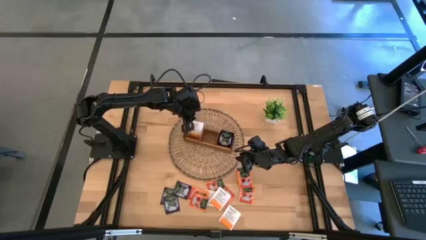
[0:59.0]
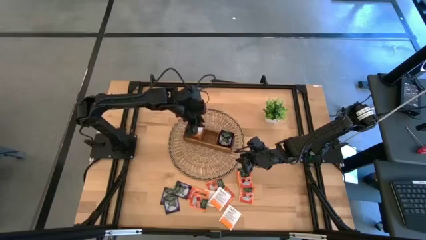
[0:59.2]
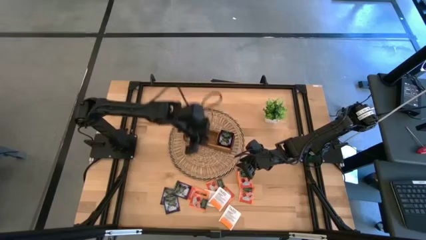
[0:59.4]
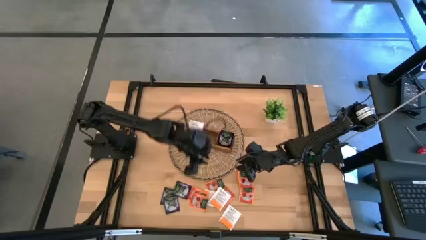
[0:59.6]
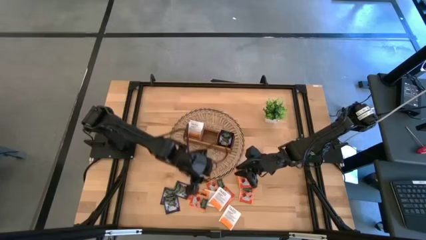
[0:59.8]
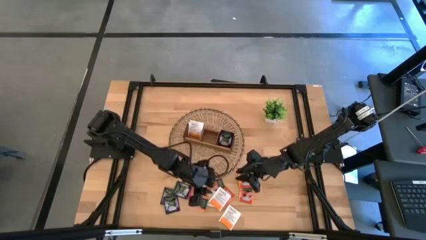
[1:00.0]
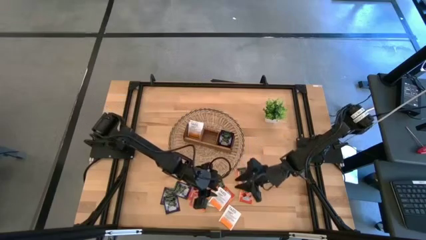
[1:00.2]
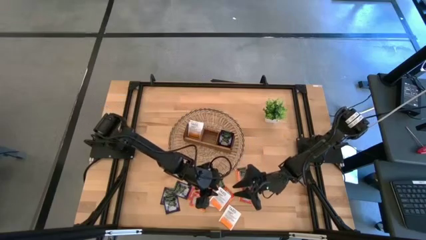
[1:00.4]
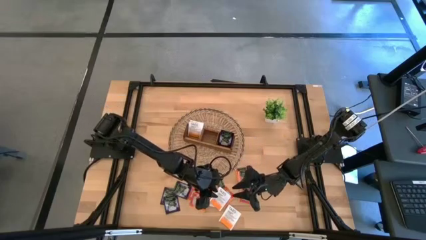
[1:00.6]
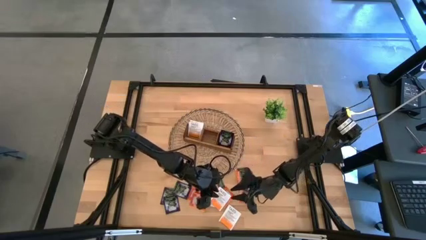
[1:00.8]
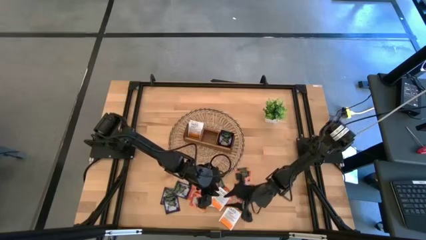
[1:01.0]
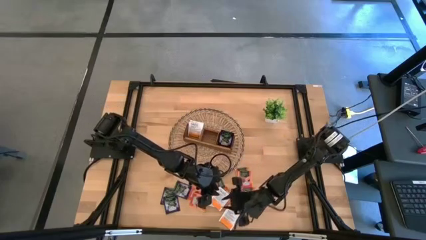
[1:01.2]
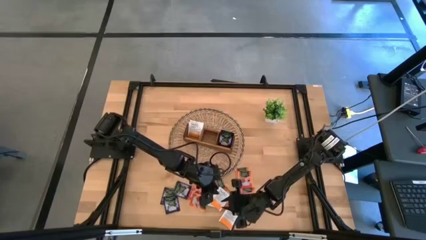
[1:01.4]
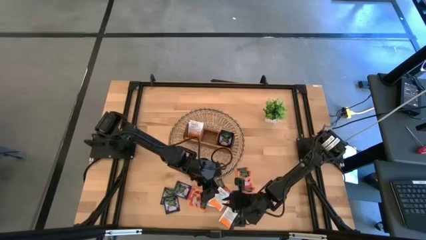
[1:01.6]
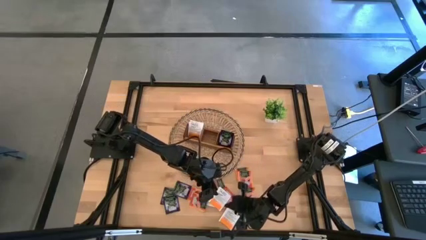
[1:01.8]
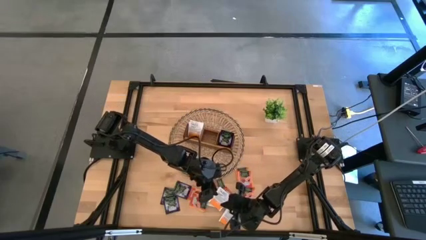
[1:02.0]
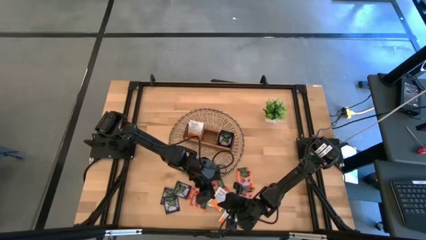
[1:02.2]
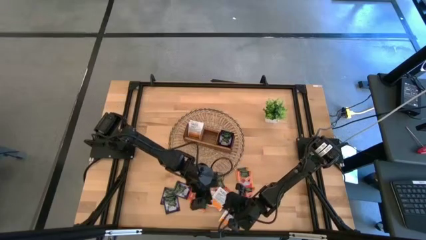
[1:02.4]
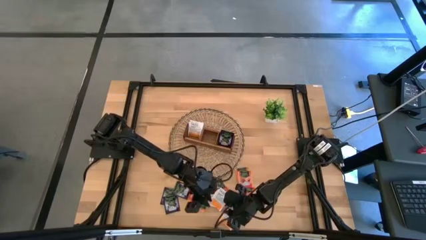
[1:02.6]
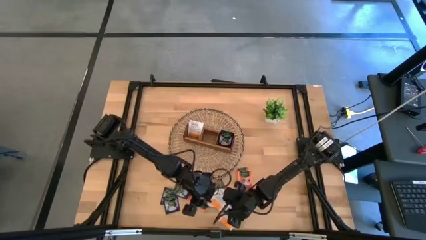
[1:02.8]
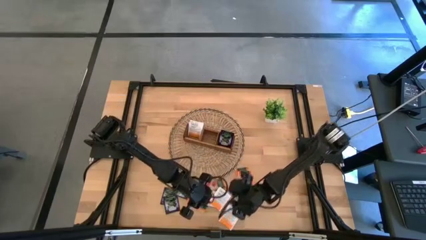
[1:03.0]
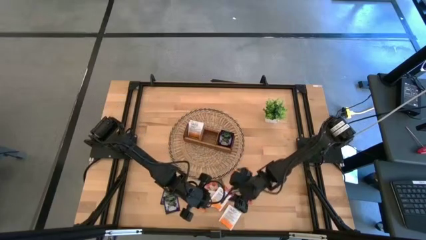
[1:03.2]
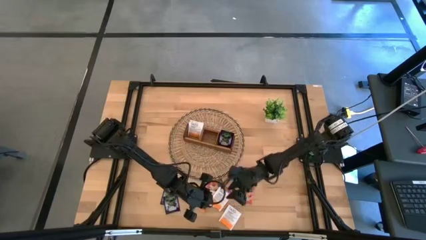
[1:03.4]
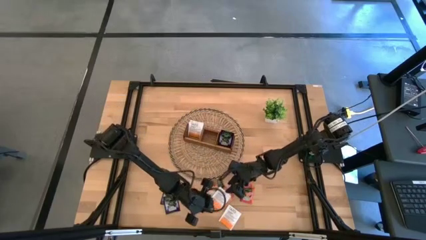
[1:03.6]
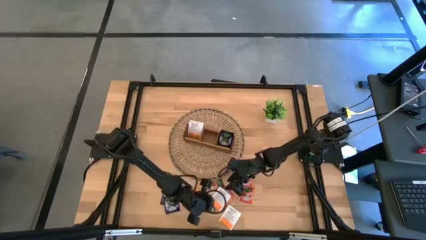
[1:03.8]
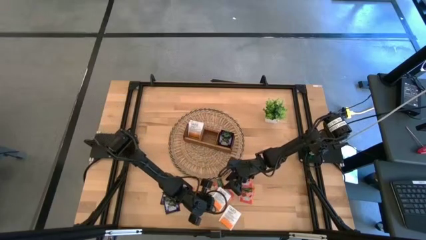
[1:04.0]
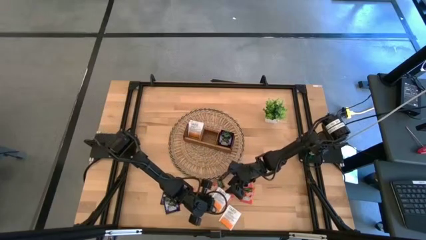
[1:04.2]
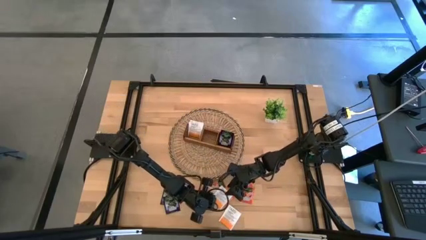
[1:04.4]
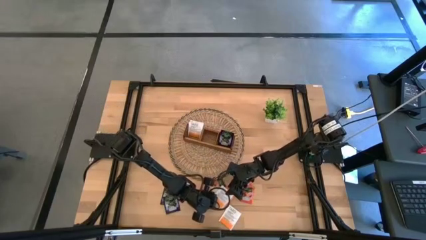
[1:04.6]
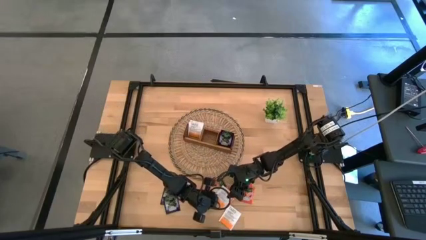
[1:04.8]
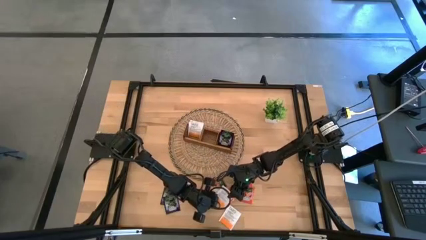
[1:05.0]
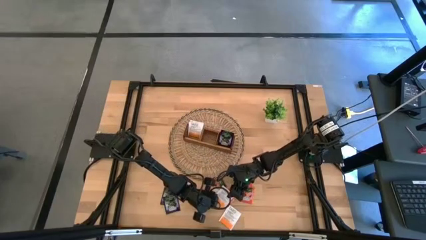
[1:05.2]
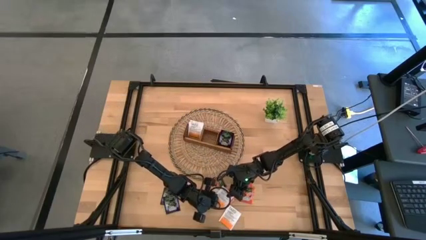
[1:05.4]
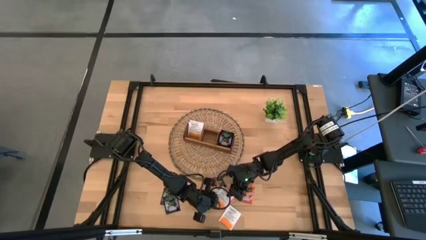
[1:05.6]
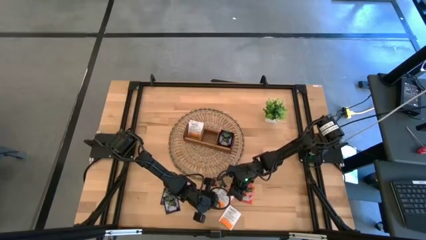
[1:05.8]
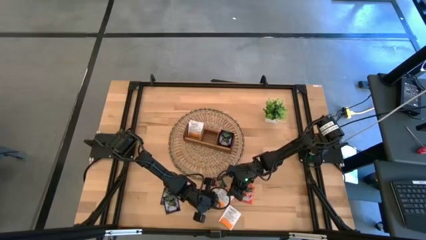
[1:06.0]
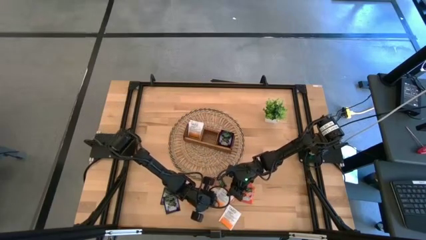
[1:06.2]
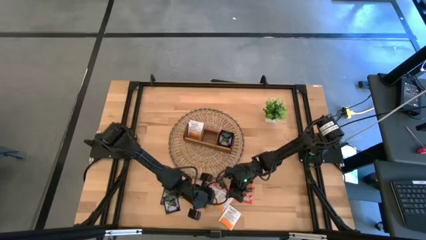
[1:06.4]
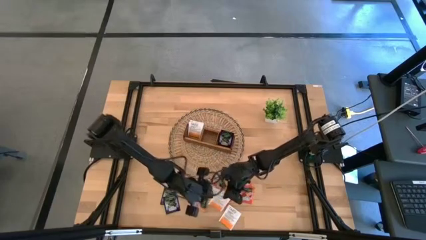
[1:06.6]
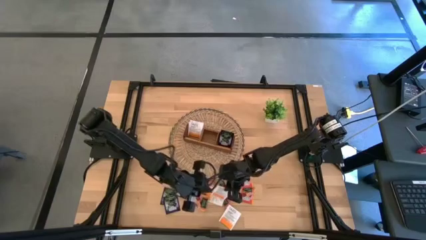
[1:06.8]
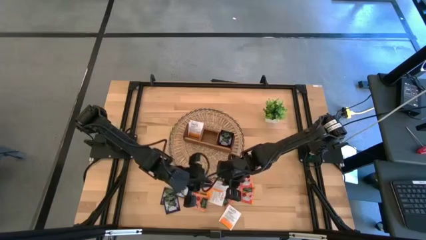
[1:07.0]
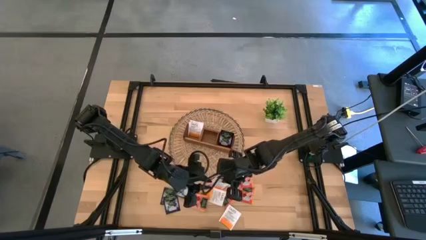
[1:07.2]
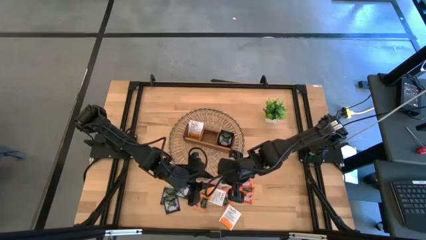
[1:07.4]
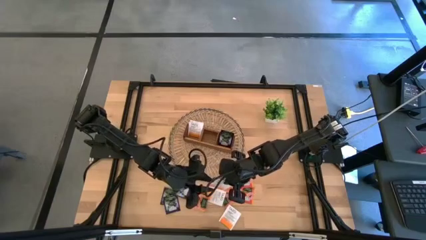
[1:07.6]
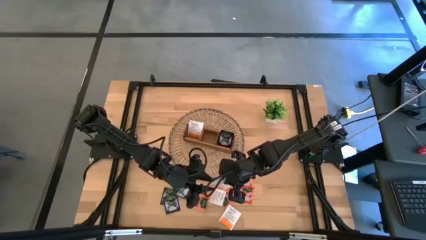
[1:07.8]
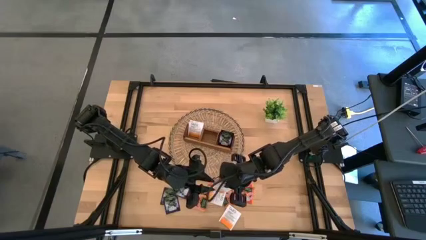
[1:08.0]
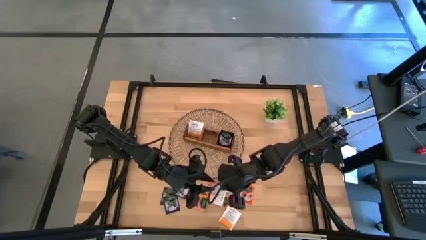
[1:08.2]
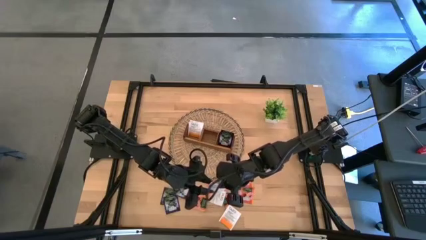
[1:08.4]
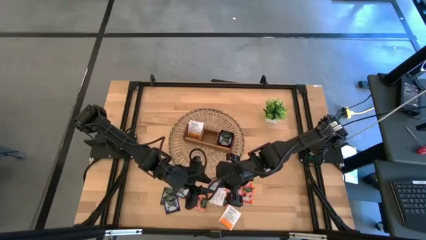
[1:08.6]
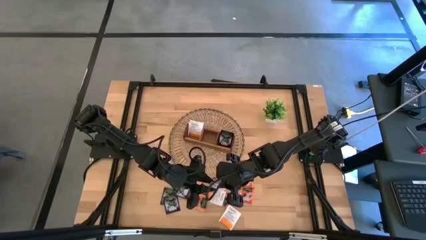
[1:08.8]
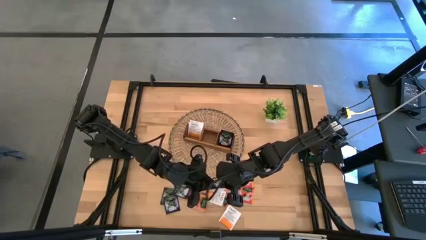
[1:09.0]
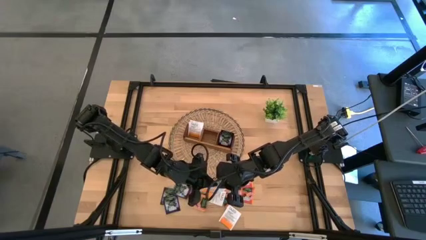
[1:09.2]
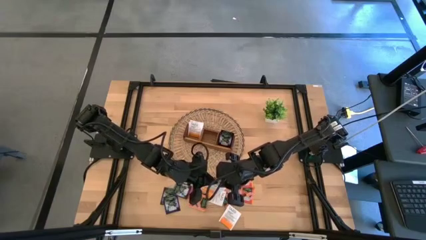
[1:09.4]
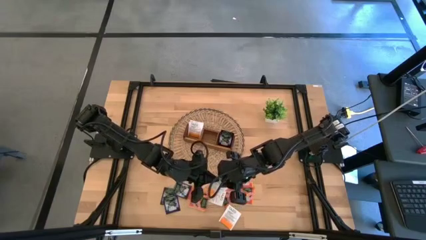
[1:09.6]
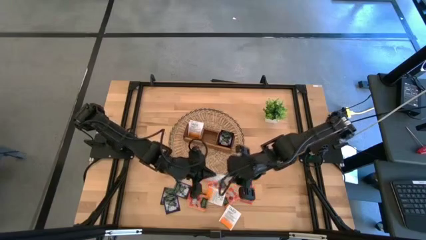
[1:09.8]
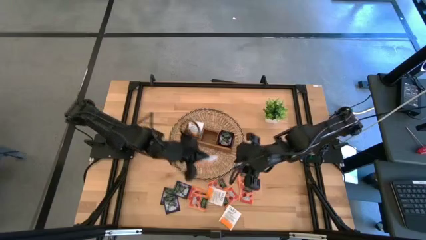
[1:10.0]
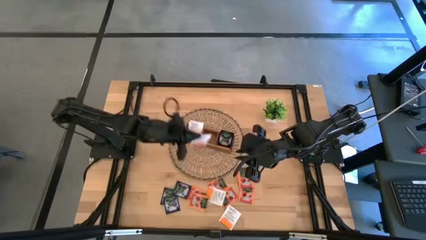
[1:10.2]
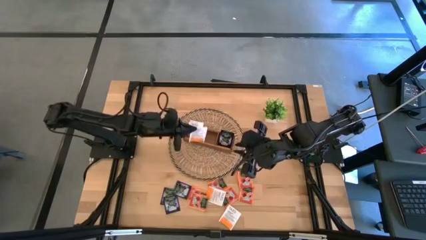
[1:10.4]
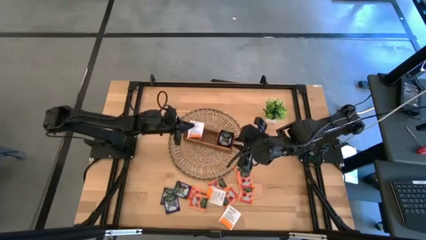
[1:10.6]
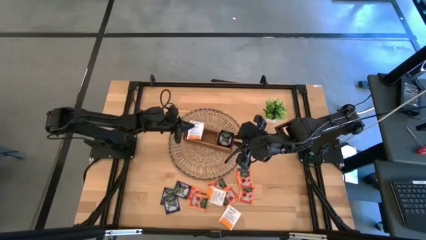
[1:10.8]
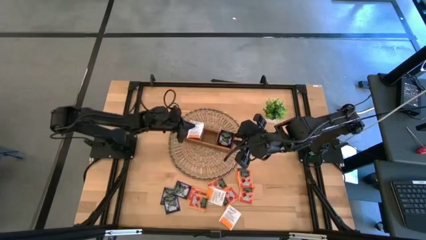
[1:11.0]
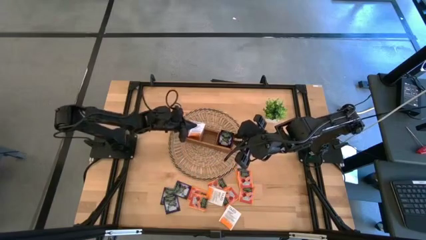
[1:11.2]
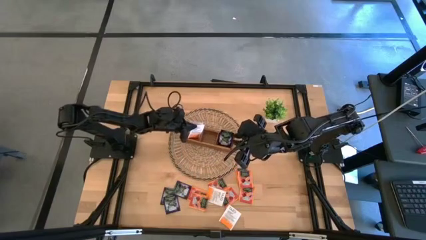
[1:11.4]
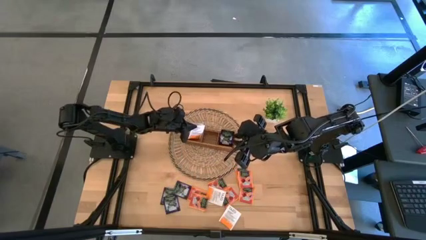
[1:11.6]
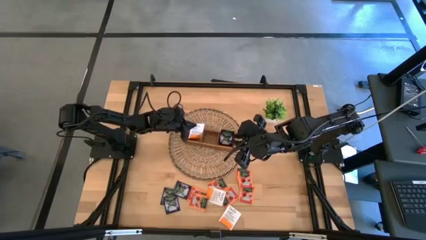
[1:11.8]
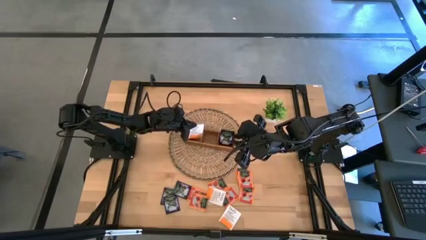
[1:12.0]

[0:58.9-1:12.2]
Task: Pick & Place Tea
Put the white tea bag into the left section of the wooden organizer
